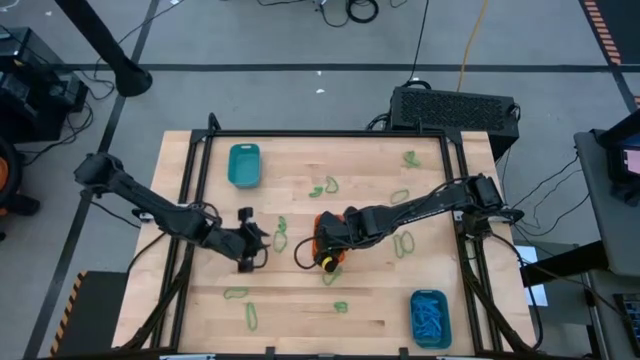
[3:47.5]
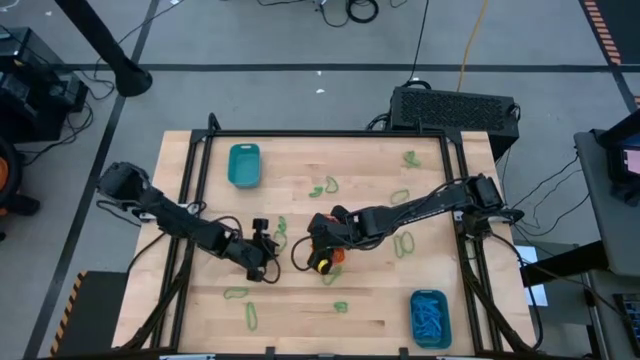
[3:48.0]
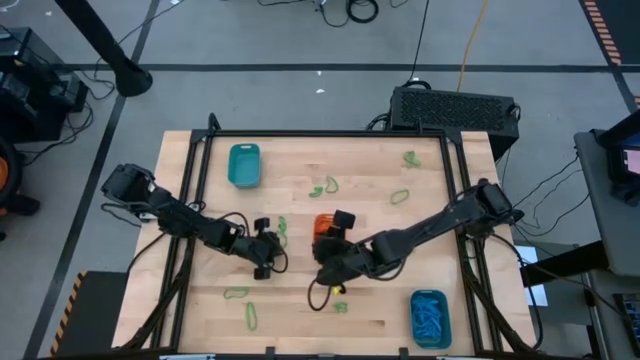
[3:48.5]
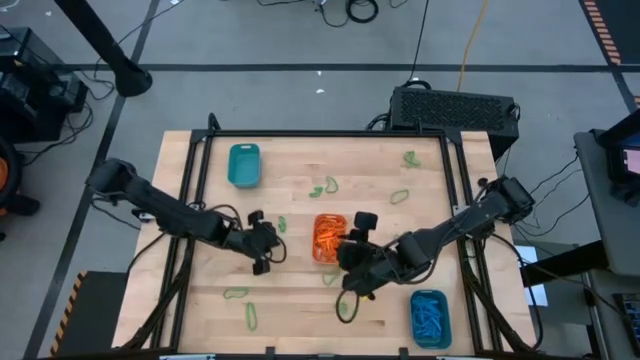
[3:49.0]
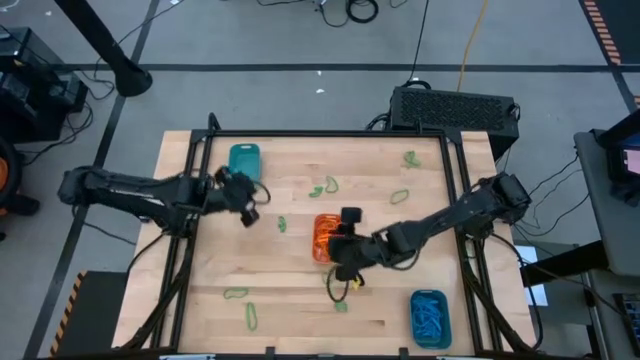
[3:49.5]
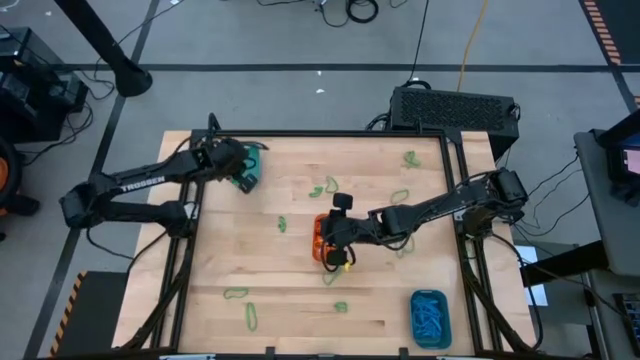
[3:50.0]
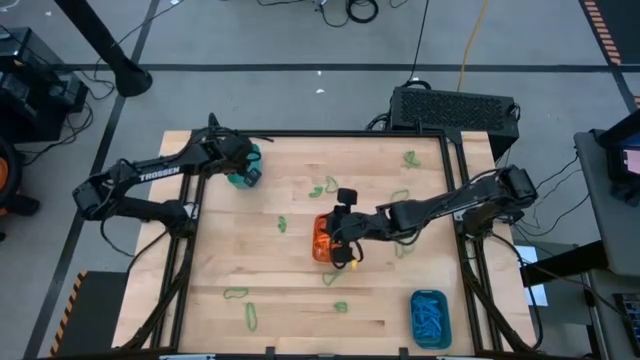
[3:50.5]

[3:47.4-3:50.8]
Task: Sort rubber bands into baskets
Put the green rubber band into the green bin

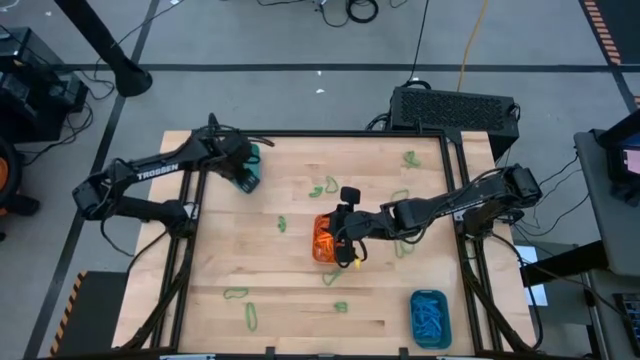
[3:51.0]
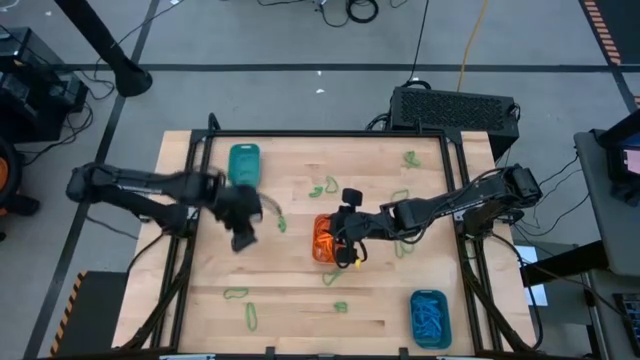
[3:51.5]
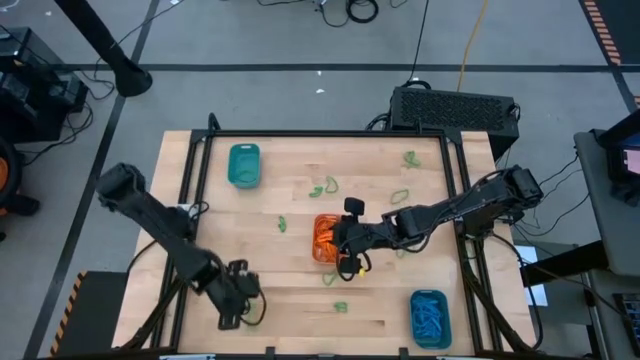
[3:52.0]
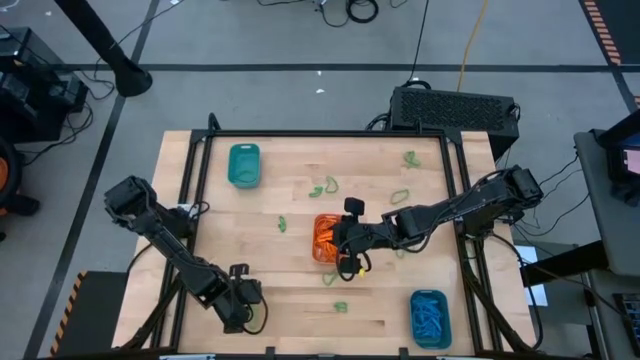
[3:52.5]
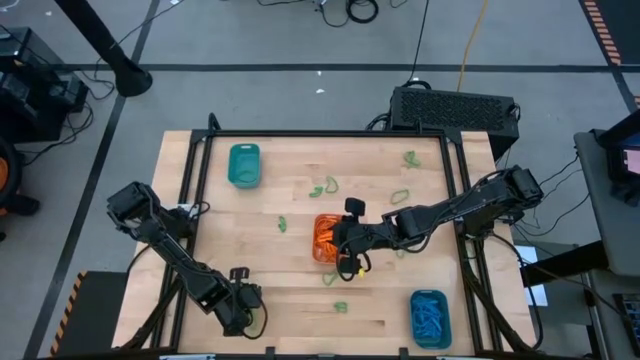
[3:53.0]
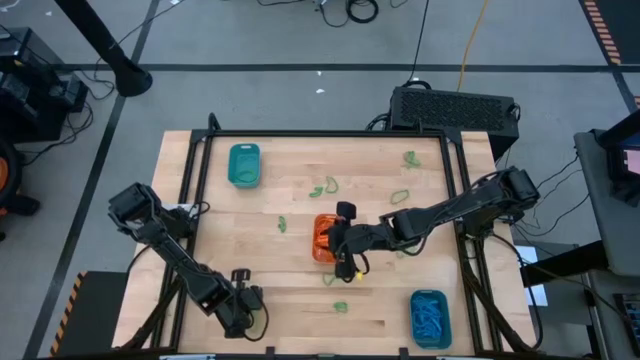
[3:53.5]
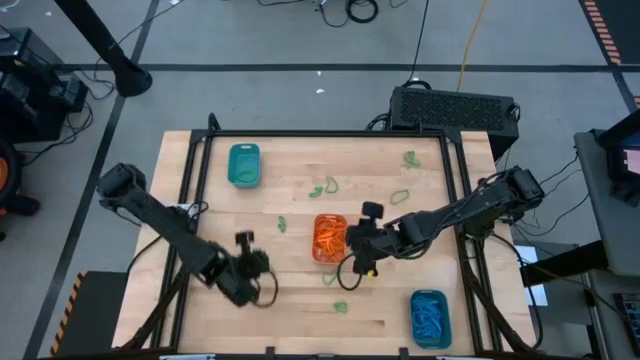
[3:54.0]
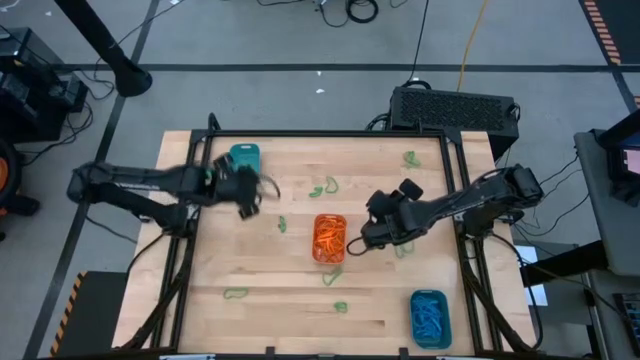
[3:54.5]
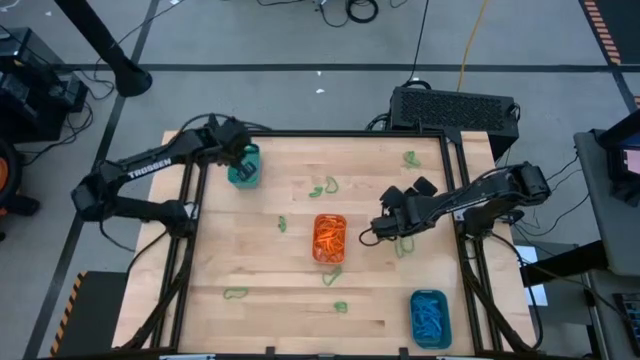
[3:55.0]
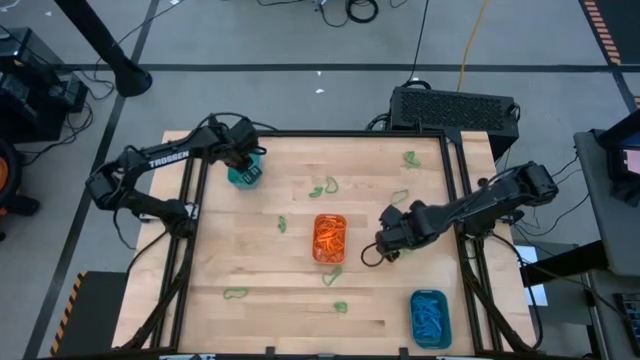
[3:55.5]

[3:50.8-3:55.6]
Put the green rubber band into the green bin

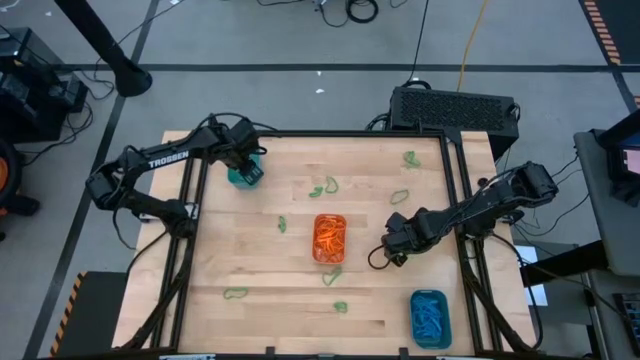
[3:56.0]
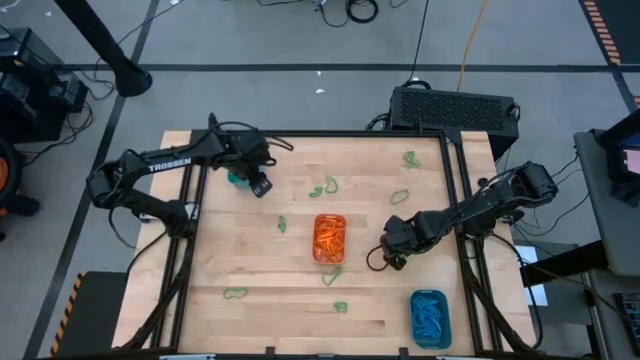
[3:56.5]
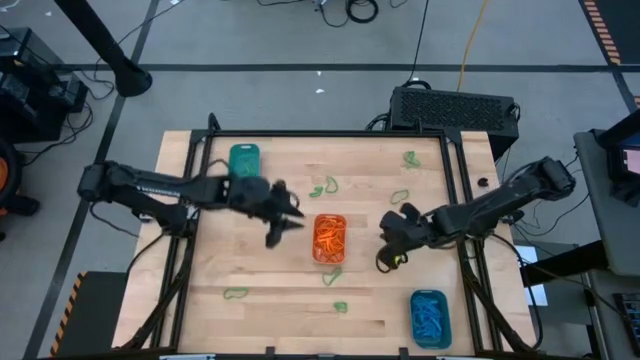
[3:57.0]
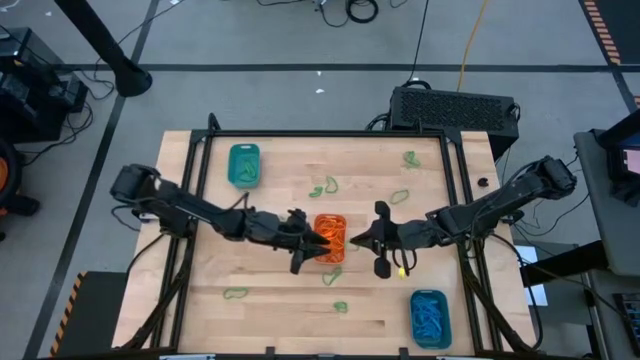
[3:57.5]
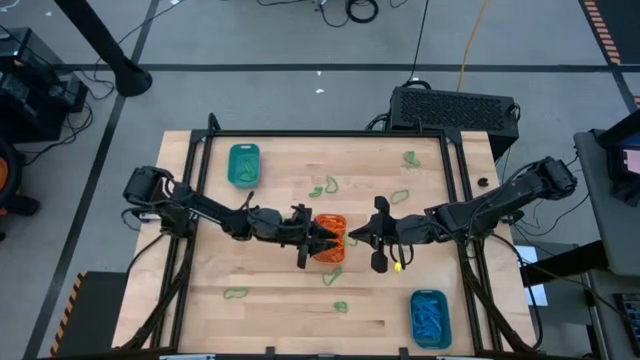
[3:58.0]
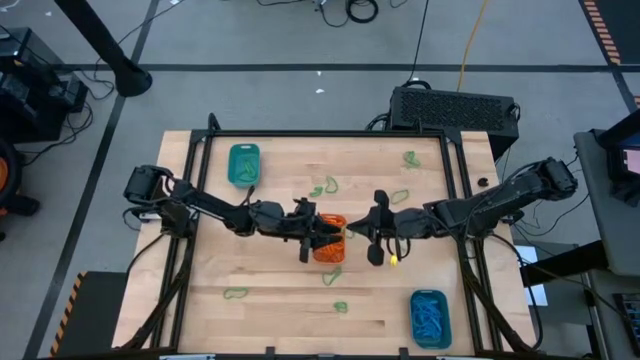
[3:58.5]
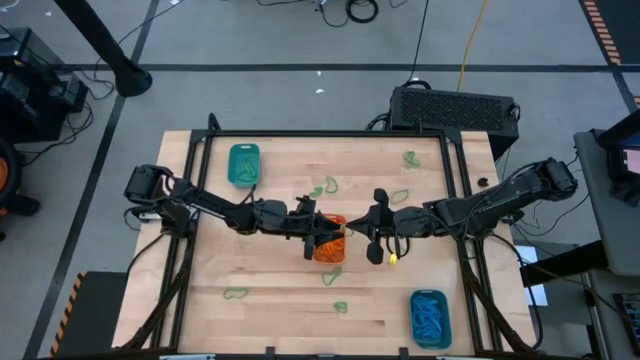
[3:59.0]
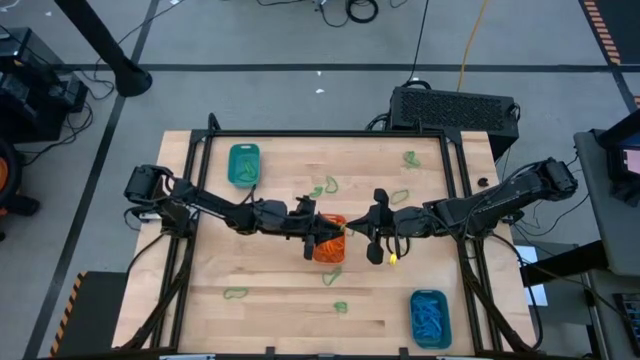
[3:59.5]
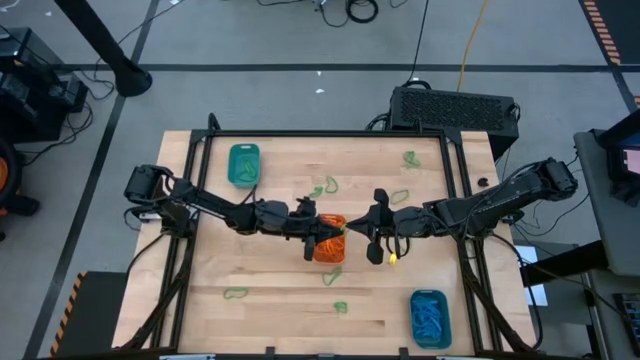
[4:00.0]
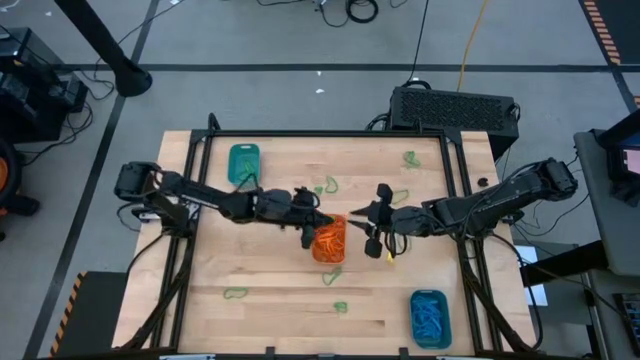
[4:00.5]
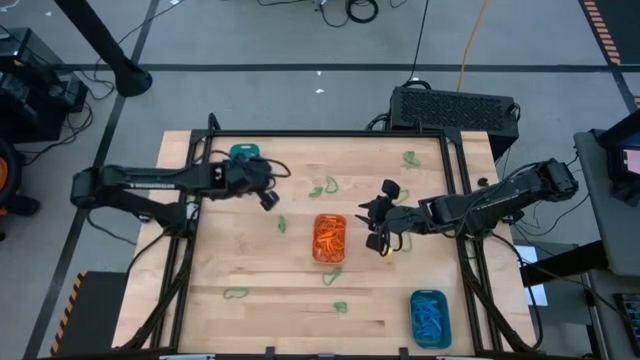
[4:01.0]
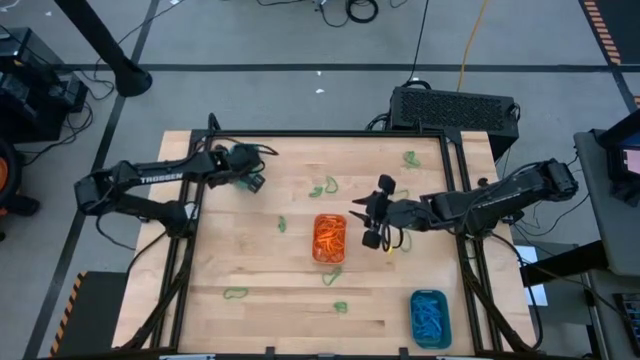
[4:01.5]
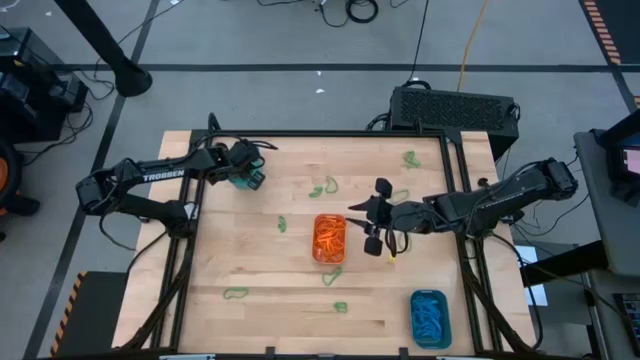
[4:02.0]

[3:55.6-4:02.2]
Put the green rubber band into the green bin

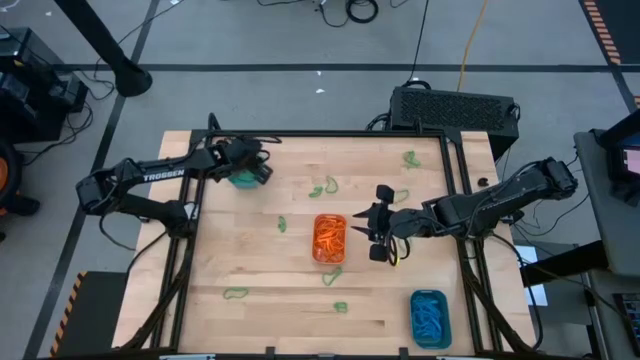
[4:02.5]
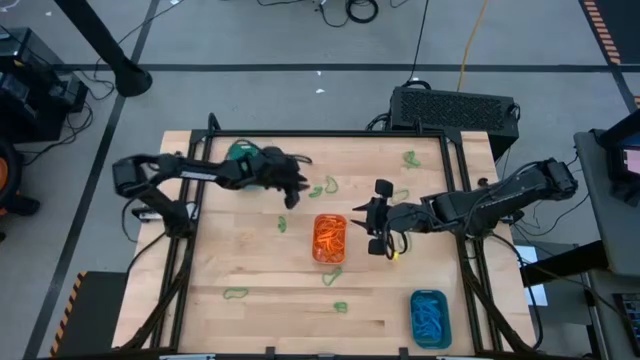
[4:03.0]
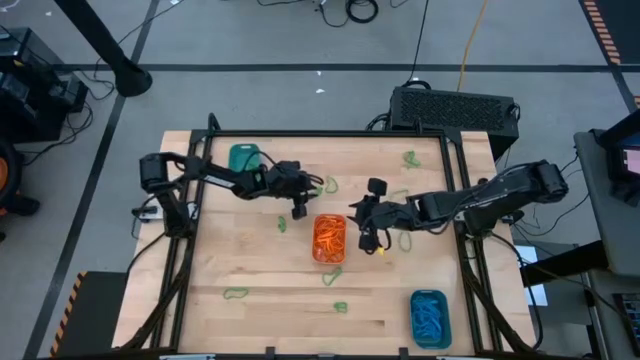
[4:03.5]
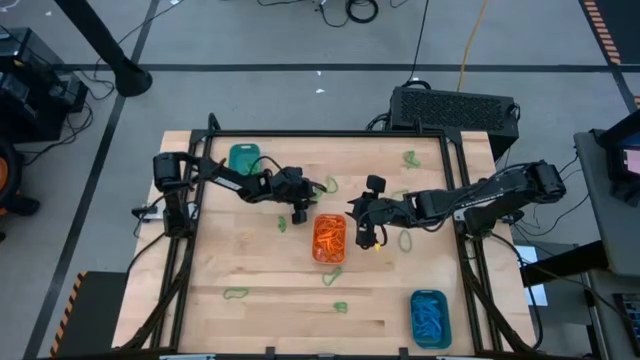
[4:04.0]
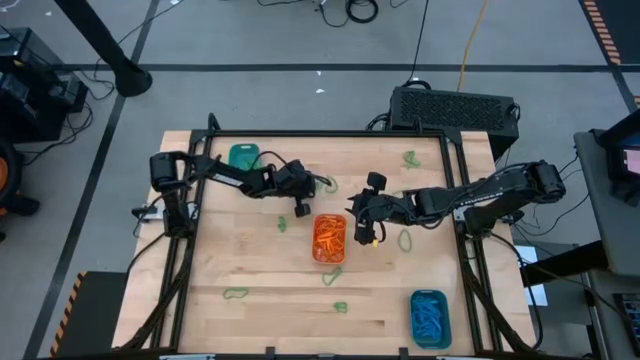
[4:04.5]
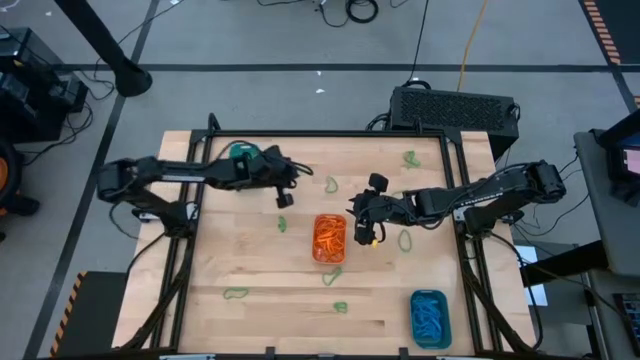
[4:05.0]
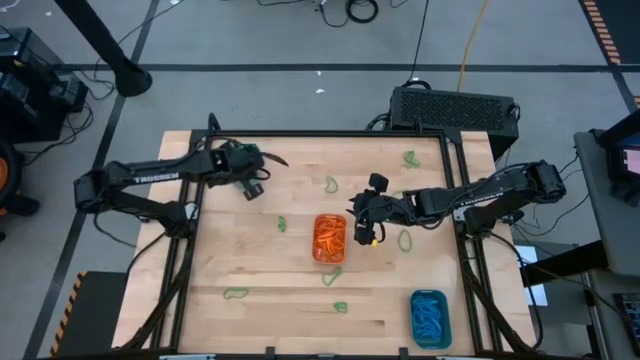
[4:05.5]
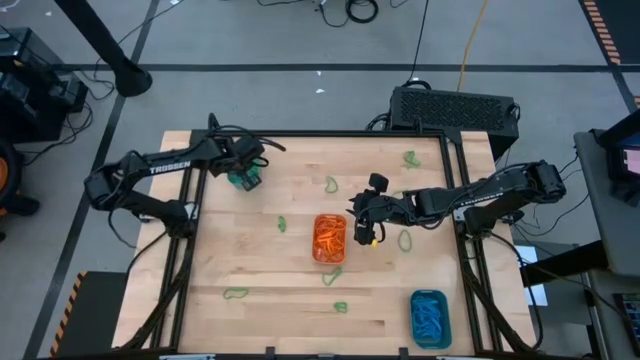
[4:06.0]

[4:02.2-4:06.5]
Put the green rubber band into the green bin

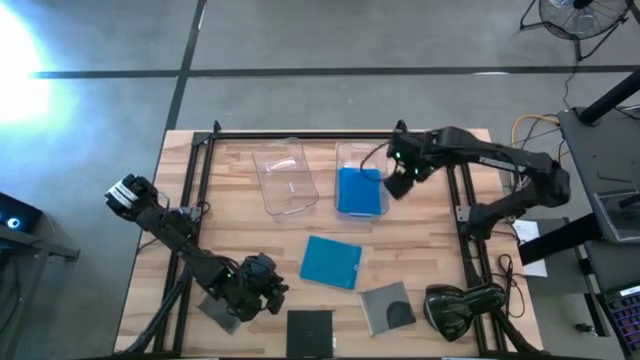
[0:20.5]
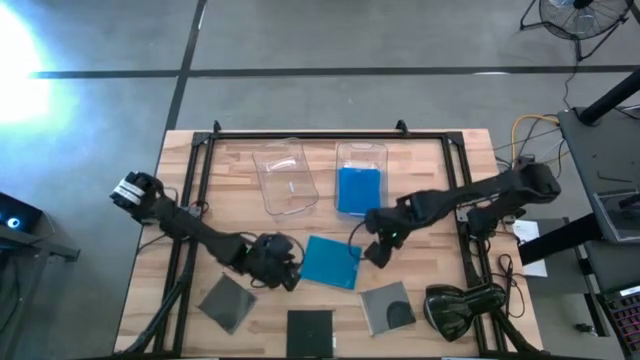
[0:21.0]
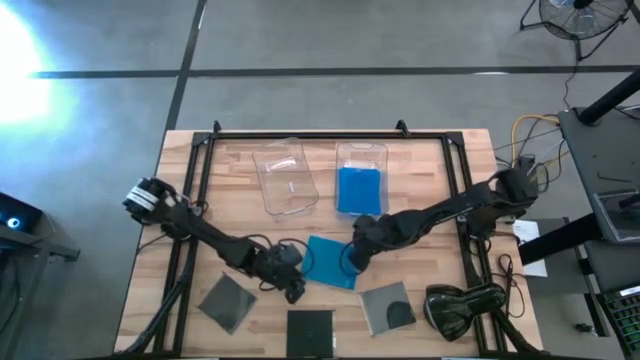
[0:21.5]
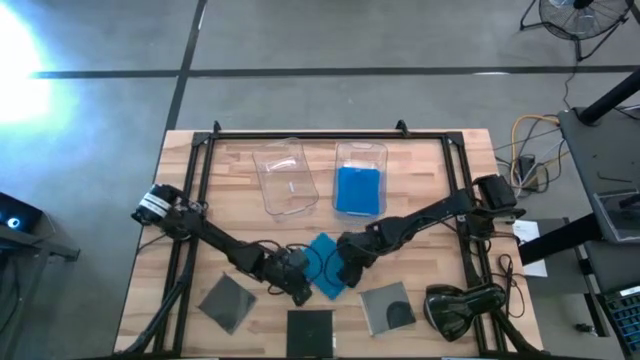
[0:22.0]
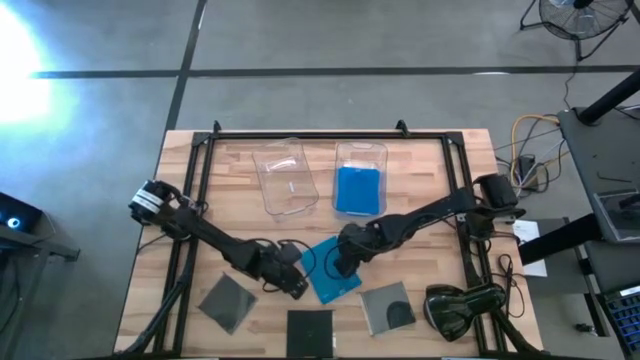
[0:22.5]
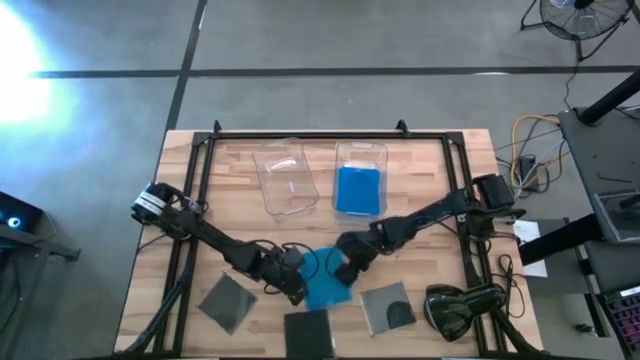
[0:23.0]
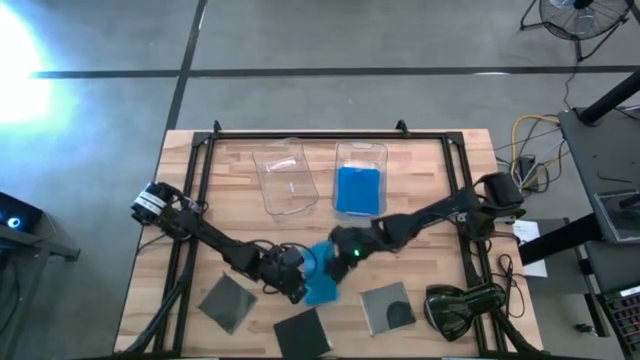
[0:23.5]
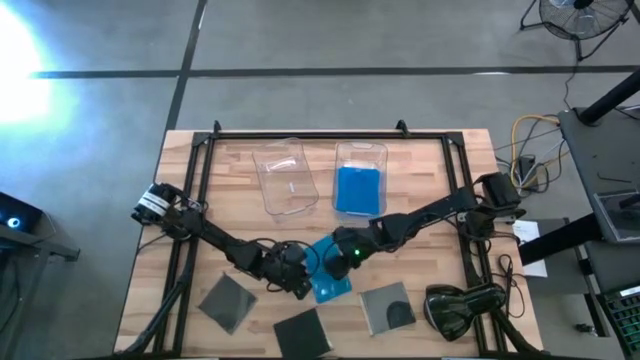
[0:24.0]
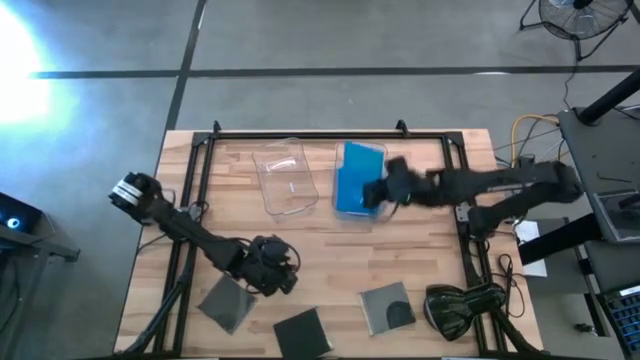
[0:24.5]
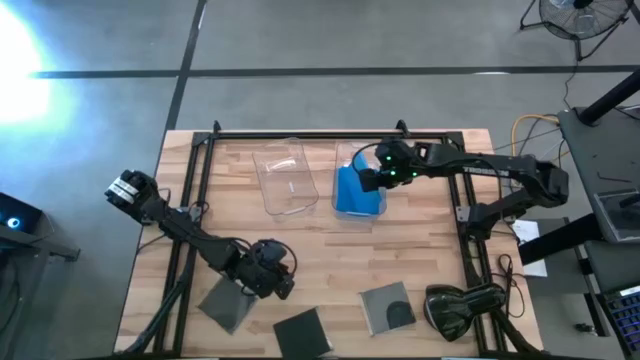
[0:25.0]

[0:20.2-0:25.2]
Task: Pick & place jewel cases by type
Put the blue CD case into the right transparent bin
